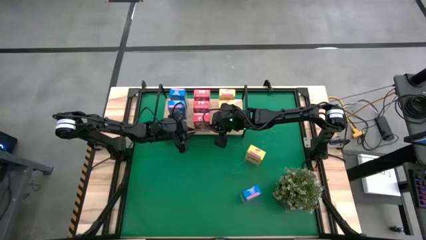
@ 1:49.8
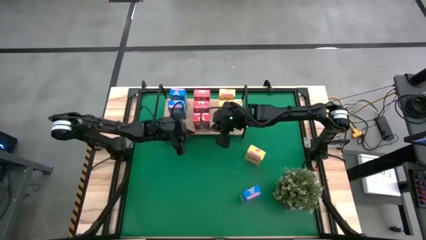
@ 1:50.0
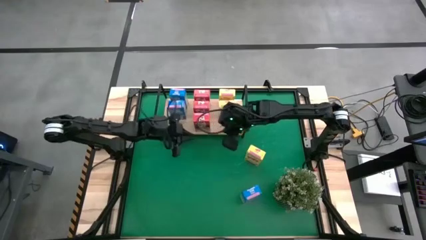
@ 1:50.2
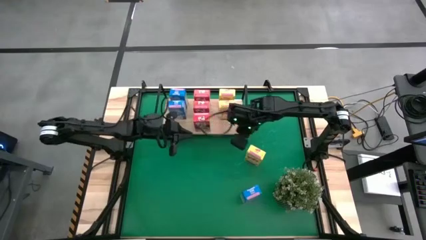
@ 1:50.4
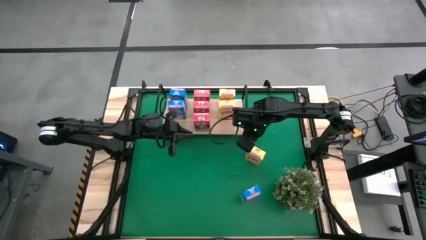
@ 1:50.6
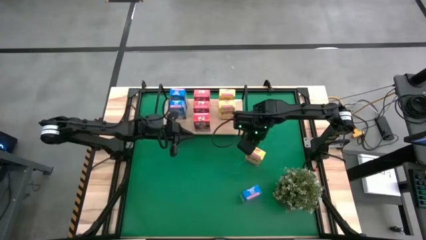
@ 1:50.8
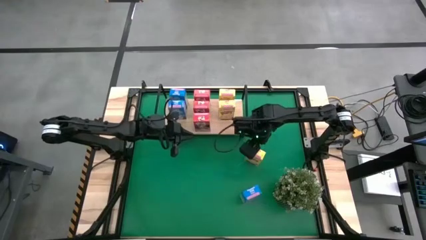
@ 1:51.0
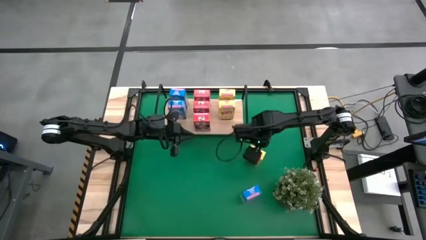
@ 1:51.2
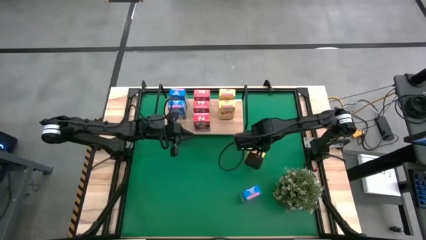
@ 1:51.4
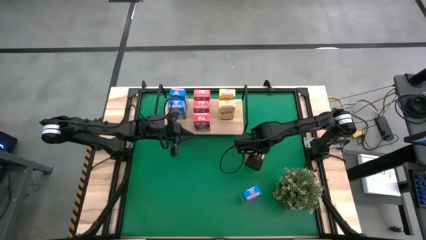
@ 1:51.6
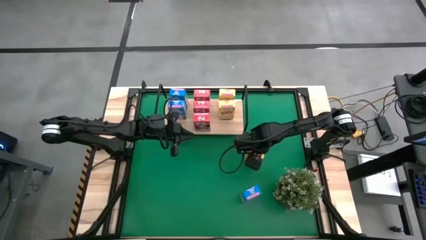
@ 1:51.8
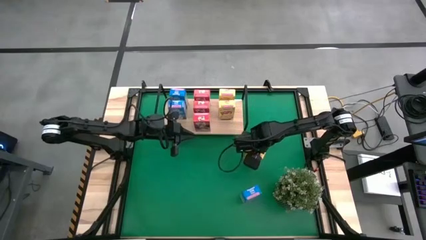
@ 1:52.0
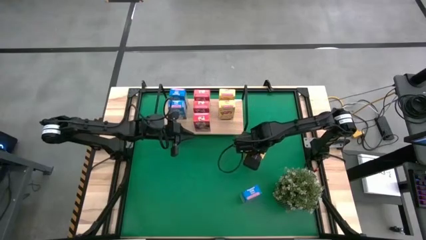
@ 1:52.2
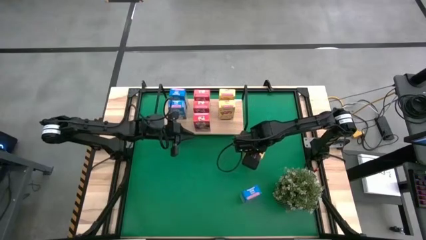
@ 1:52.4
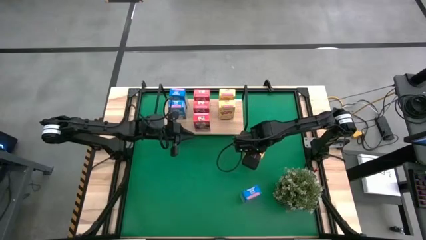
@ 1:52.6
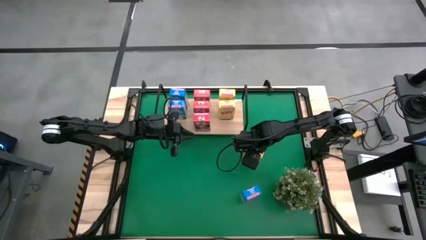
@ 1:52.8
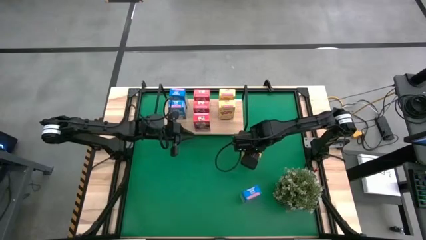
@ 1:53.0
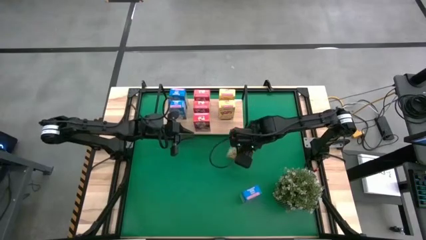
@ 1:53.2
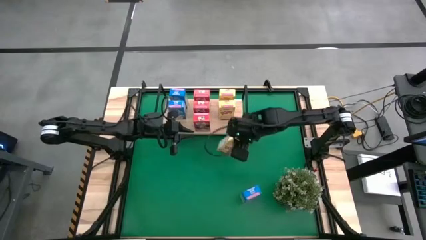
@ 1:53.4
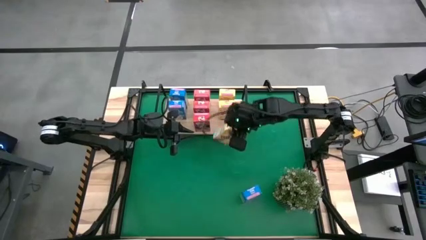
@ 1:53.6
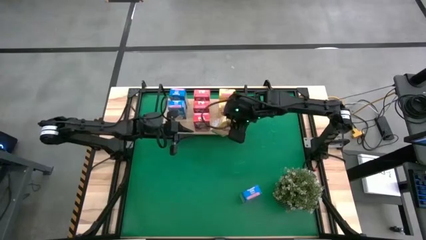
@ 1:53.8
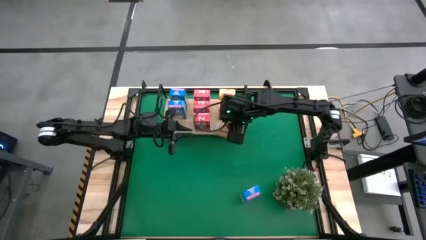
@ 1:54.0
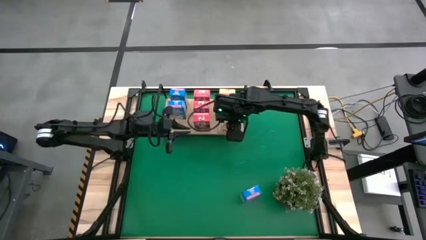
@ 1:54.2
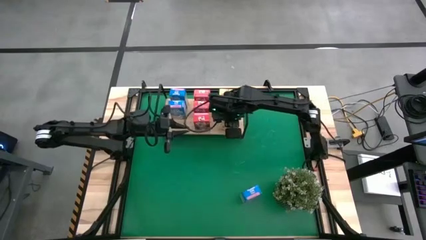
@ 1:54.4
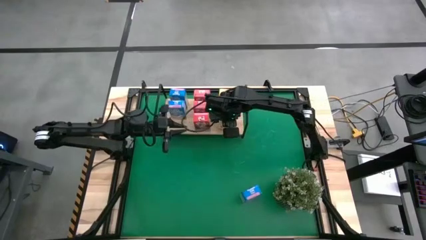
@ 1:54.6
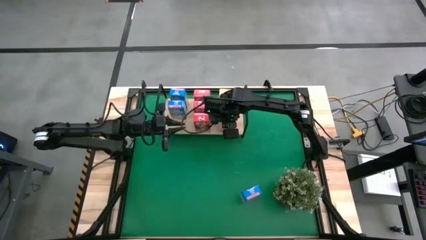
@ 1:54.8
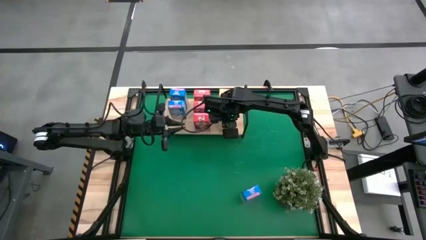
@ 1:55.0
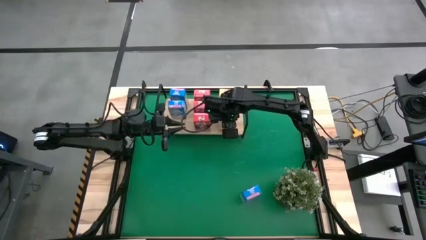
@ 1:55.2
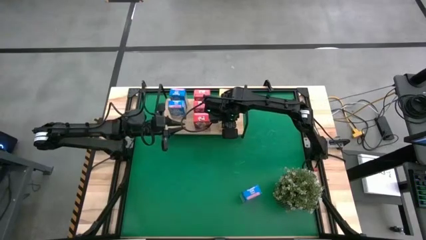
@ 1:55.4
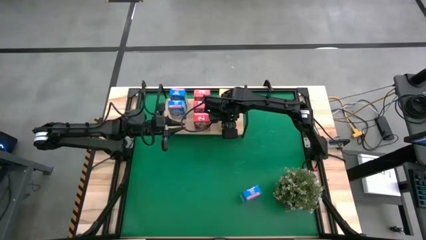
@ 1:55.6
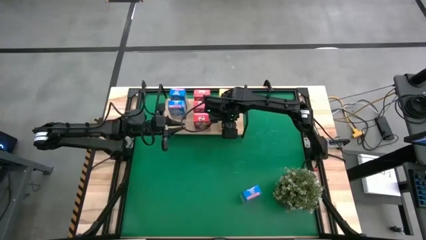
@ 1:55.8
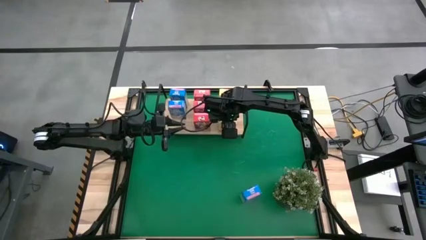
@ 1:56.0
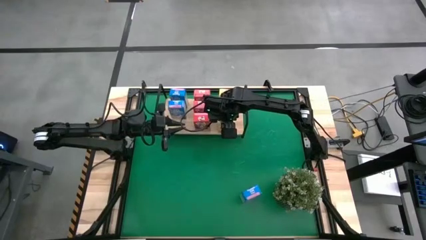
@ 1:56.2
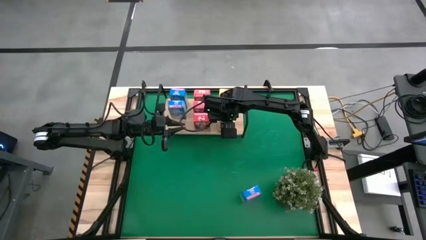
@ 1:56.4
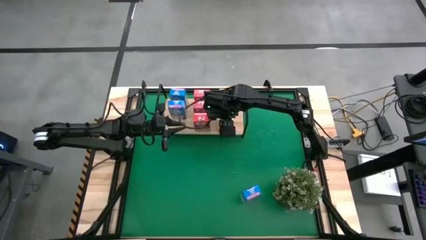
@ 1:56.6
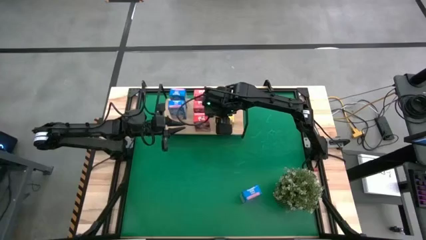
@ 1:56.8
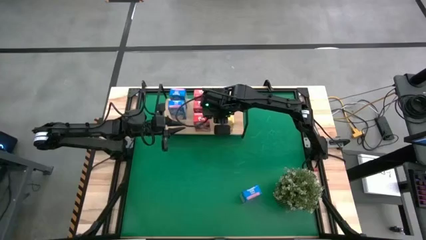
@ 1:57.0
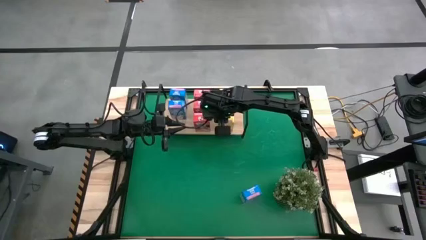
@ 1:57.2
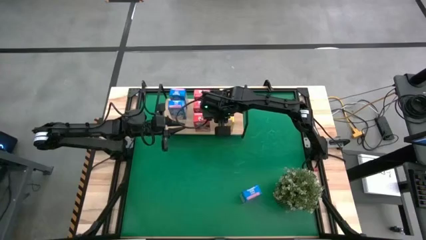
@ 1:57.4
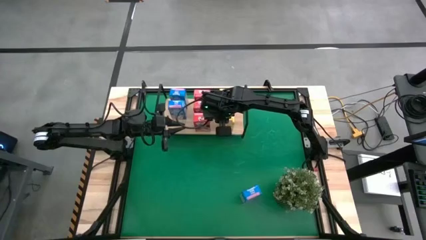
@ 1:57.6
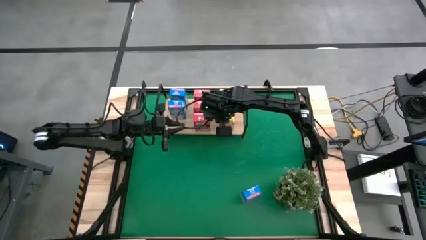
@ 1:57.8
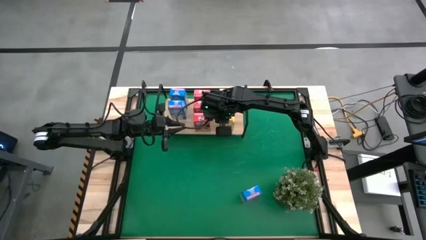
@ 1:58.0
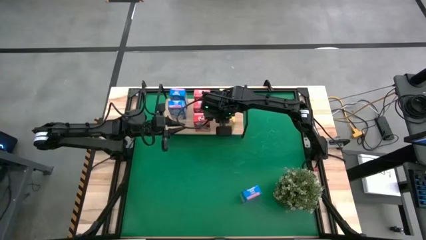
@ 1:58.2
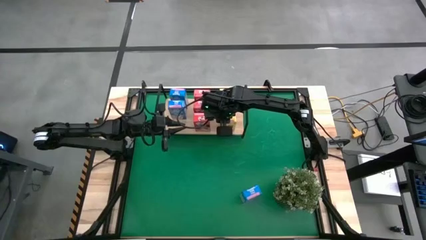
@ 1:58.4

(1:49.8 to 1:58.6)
Task: Stack cereal on shelf
Put the yellow cereal box on the shelf aligned with the other yellow cereal box

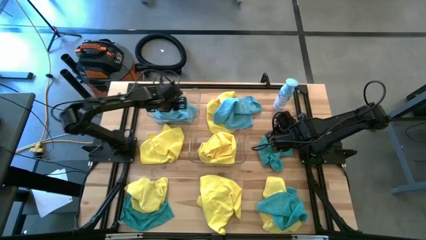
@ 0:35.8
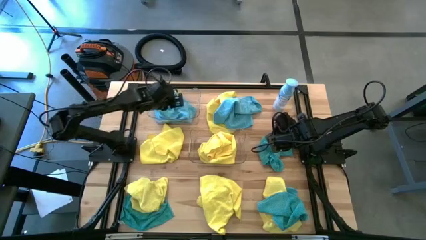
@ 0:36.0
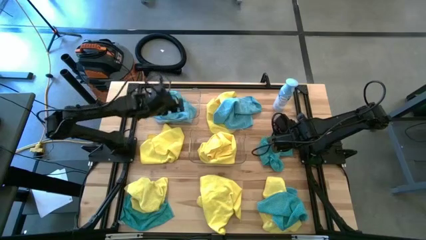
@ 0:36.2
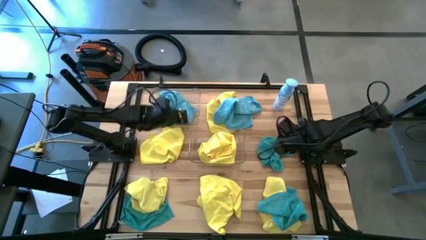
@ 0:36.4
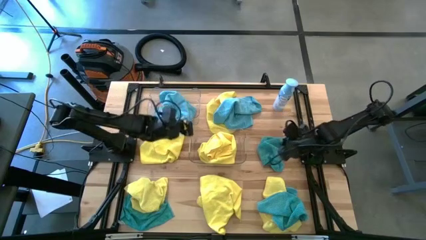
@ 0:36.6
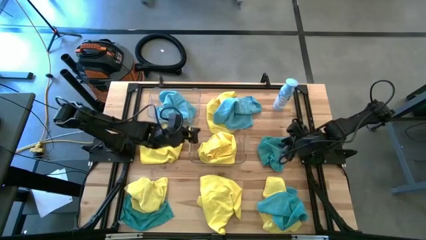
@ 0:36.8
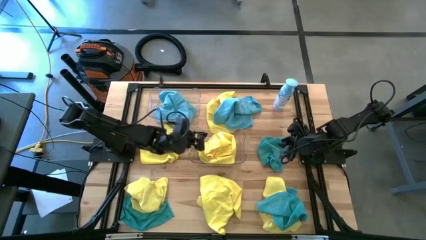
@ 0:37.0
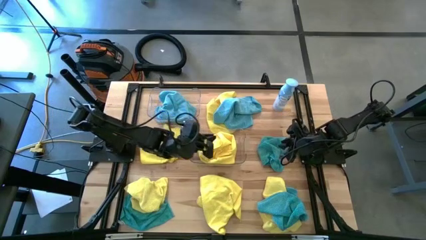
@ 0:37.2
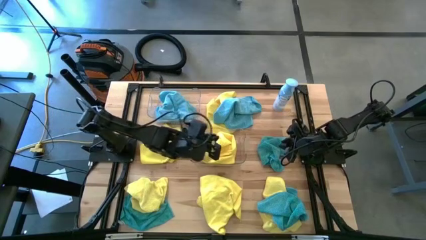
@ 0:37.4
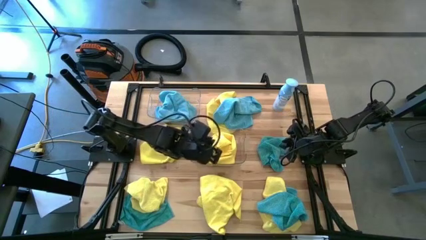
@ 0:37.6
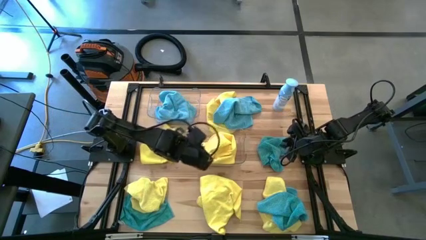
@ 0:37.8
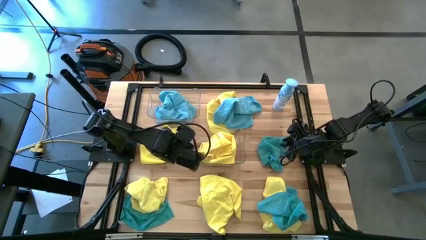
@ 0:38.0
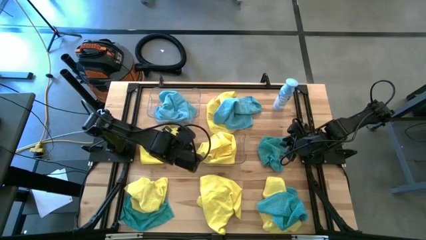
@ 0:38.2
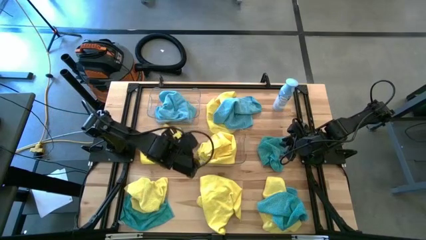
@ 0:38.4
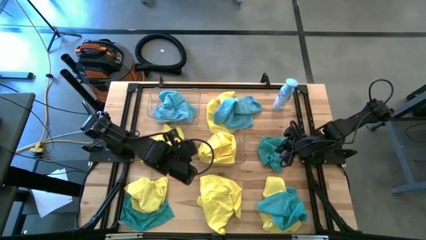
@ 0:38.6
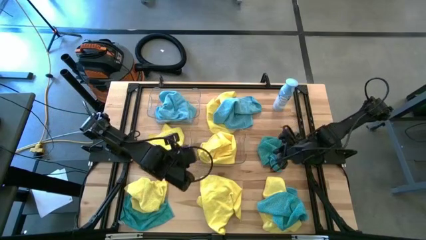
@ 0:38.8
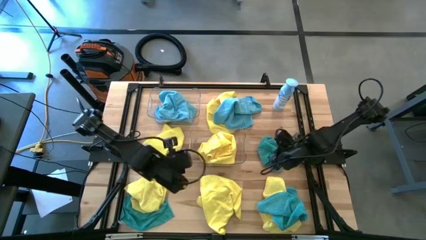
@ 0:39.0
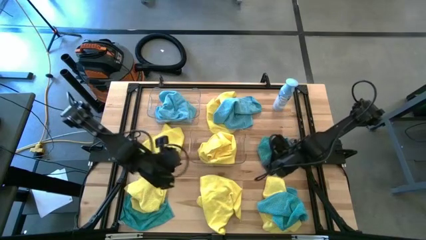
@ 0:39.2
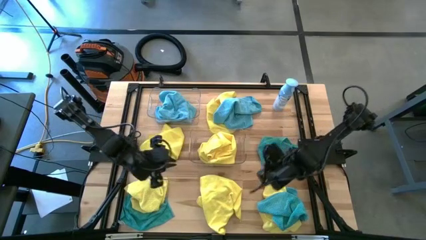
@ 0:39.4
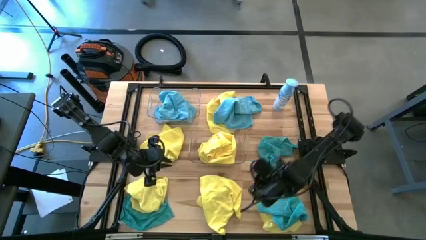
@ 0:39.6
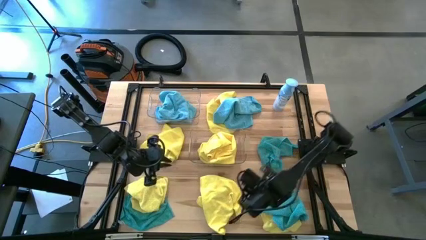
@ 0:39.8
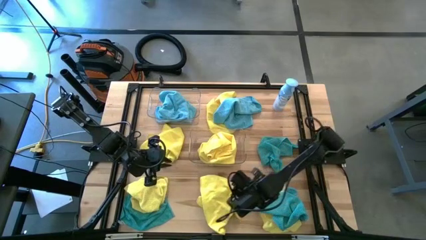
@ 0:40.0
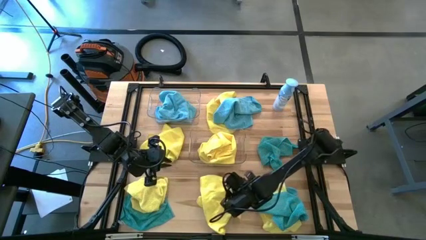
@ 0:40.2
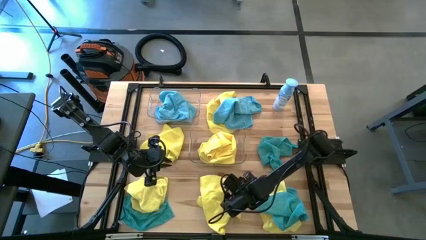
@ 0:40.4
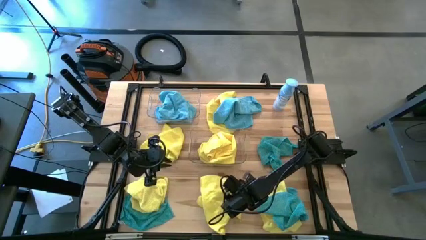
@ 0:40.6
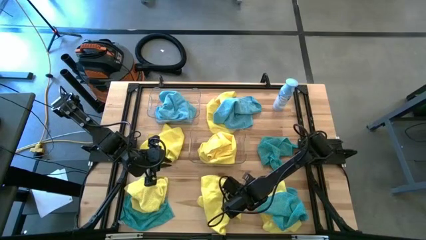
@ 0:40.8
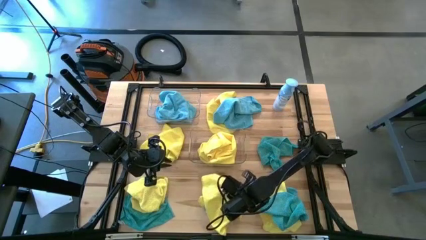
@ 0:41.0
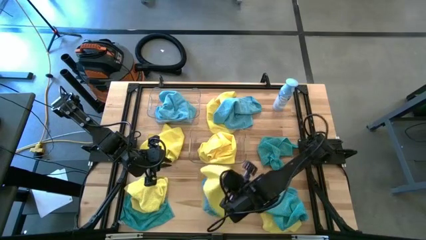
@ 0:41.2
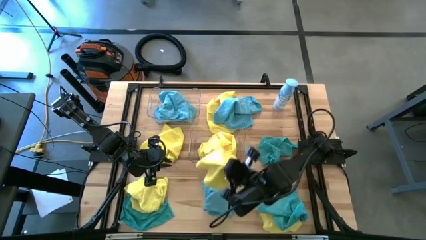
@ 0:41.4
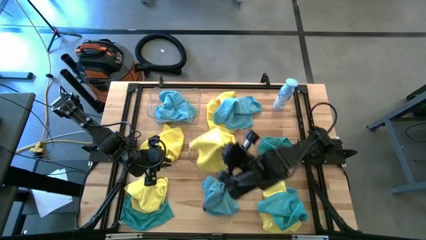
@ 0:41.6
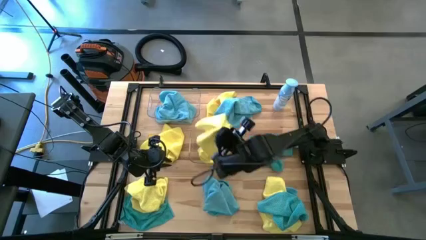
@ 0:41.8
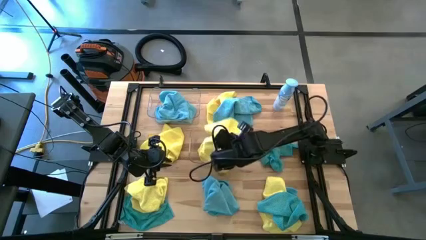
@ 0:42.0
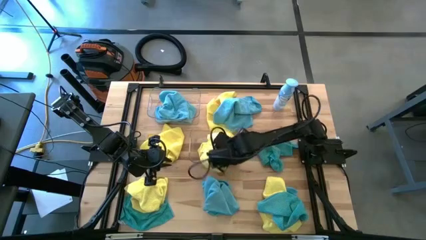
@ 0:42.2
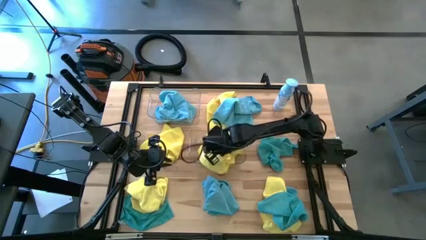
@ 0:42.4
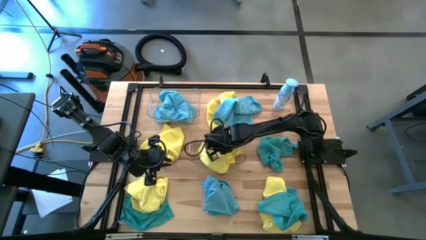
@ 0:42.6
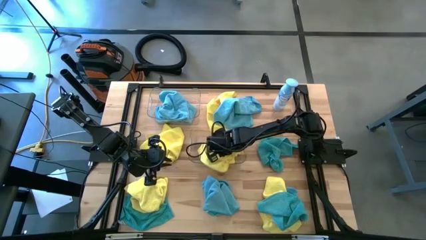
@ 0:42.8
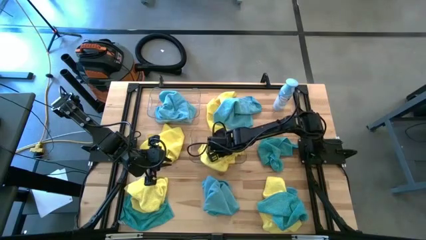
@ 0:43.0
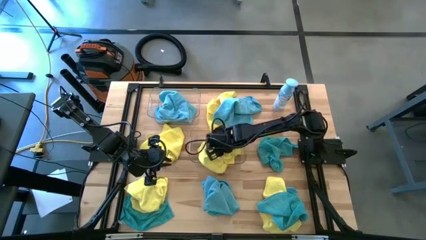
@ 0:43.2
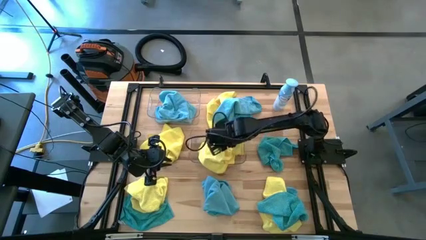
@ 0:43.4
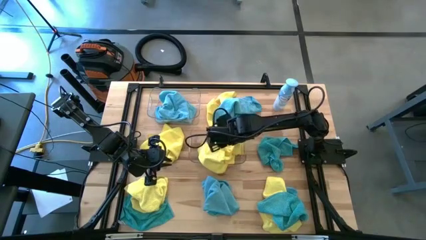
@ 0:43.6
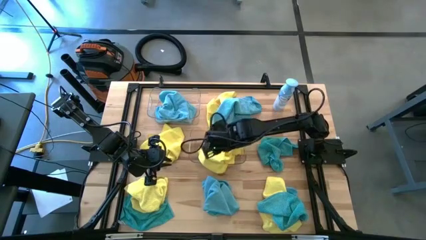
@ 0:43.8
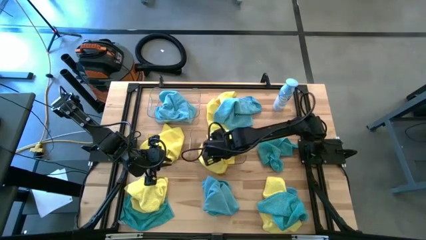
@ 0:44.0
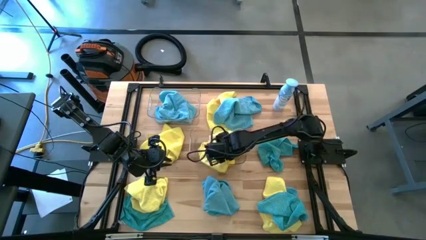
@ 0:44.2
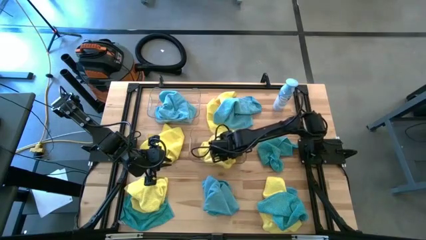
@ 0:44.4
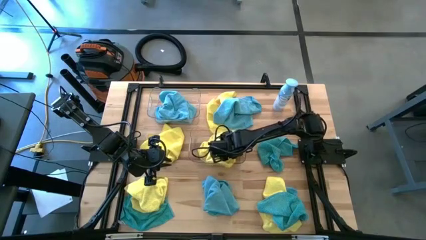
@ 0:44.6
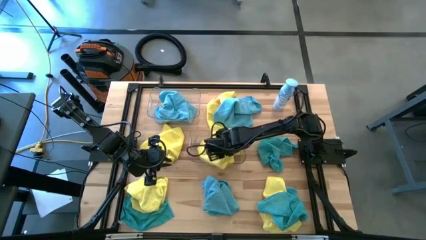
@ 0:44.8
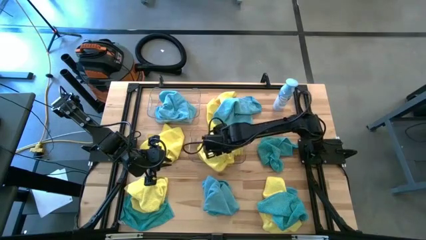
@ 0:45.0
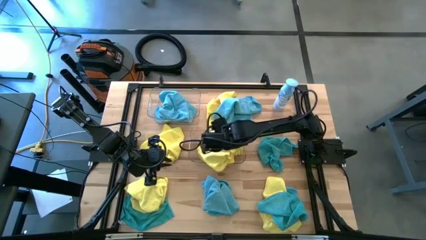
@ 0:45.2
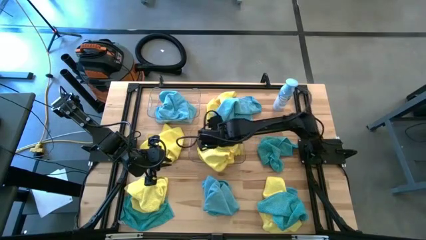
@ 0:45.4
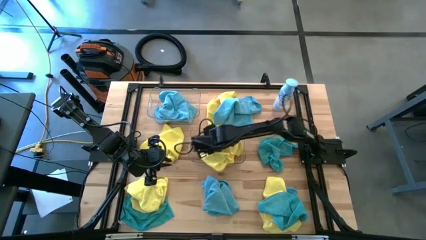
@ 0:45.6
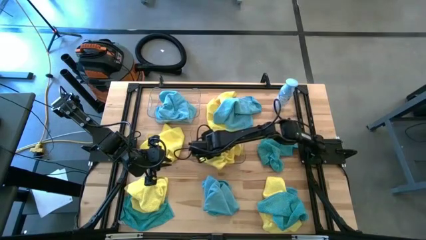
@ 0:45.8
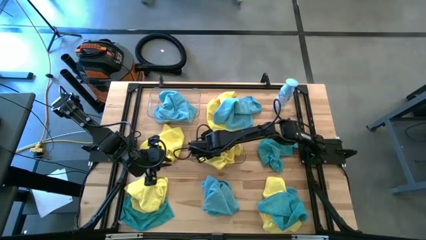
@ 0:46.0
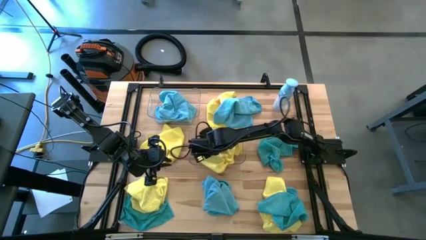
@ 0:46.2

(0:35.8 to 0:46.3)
Task: Sort microfiber towel by color & place in baskets
Put the yellow towel into the bottom transparent bin
